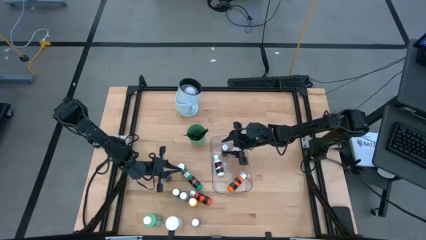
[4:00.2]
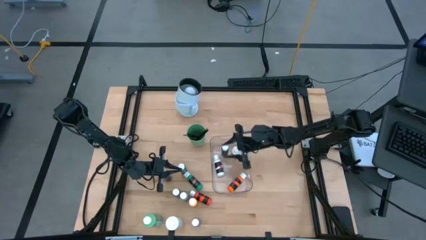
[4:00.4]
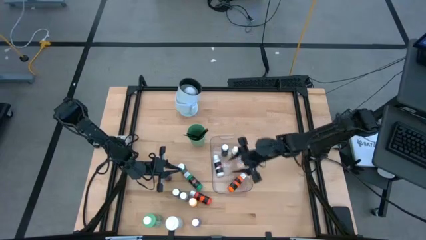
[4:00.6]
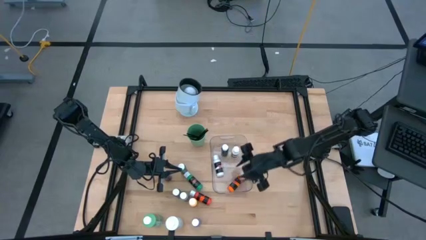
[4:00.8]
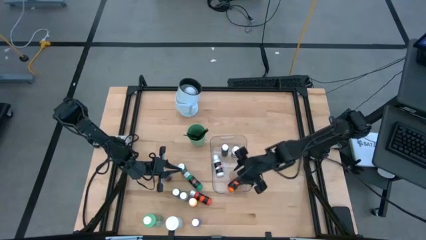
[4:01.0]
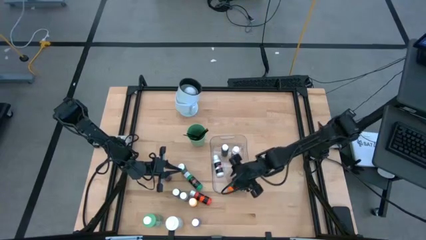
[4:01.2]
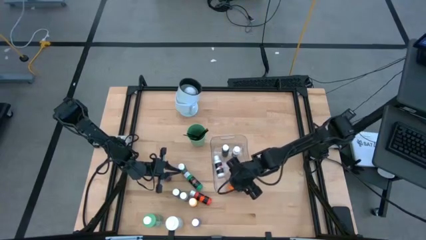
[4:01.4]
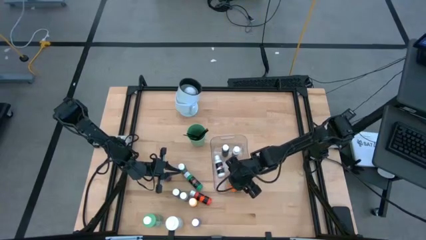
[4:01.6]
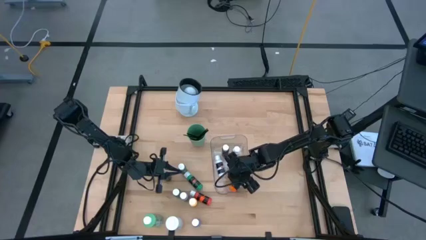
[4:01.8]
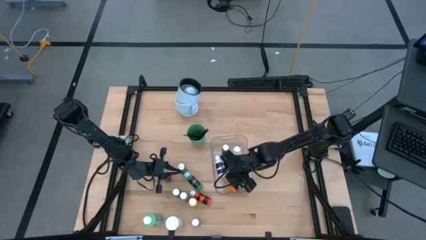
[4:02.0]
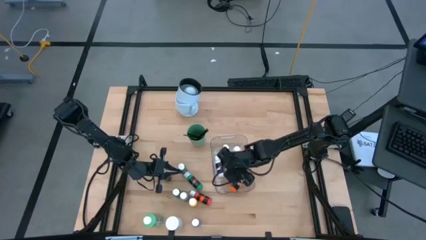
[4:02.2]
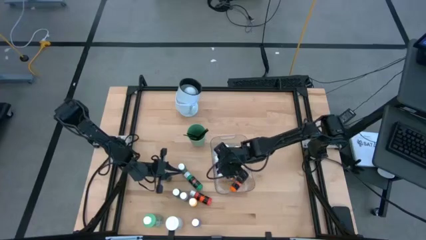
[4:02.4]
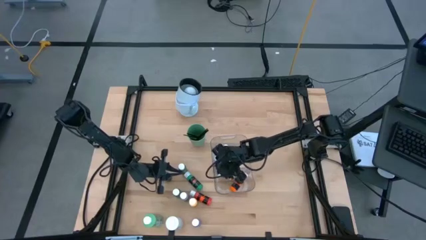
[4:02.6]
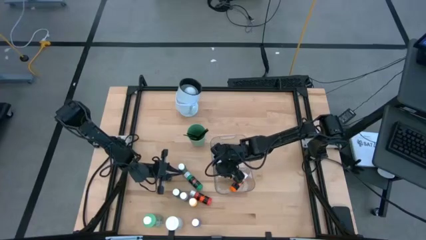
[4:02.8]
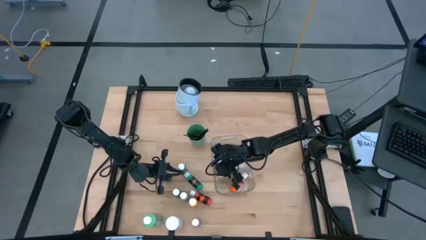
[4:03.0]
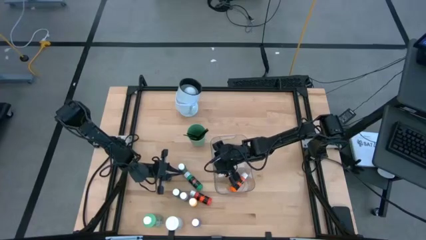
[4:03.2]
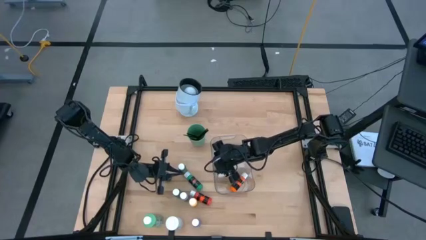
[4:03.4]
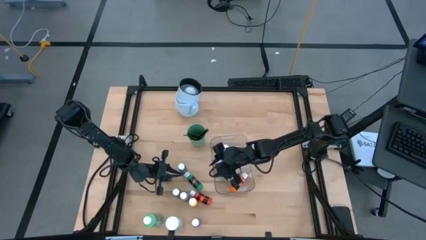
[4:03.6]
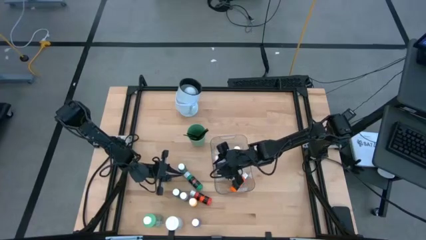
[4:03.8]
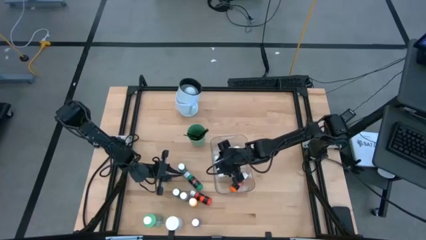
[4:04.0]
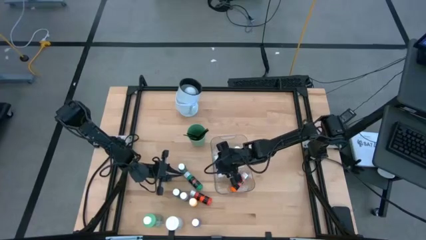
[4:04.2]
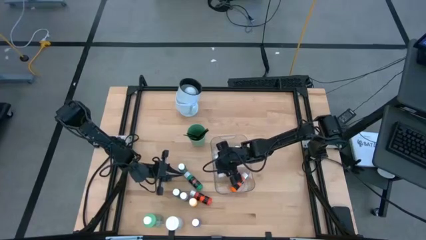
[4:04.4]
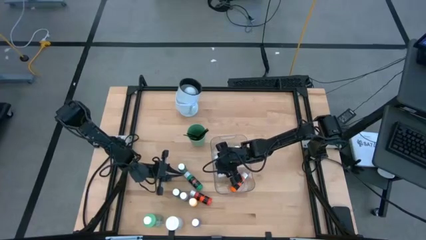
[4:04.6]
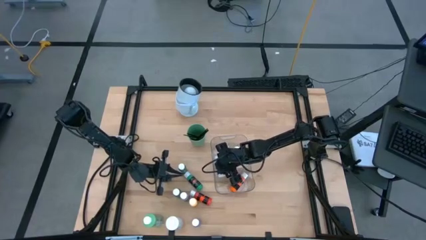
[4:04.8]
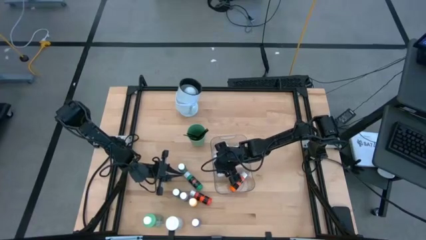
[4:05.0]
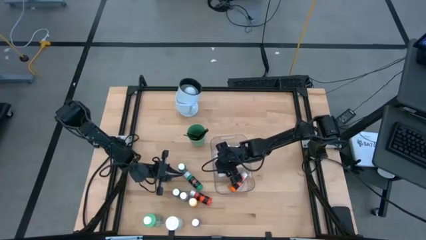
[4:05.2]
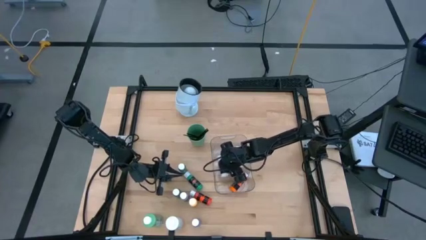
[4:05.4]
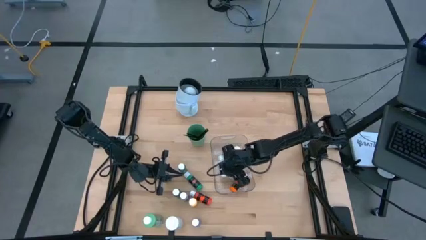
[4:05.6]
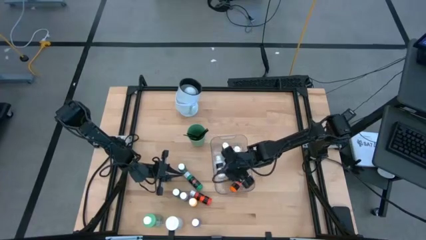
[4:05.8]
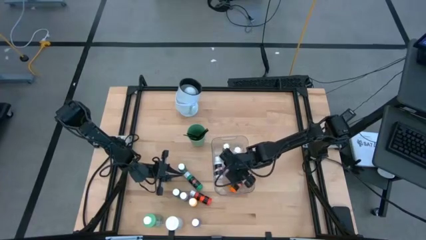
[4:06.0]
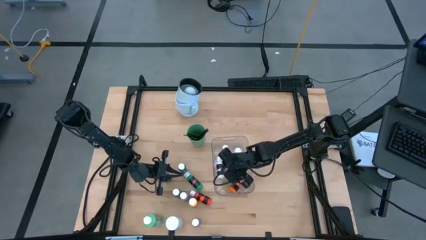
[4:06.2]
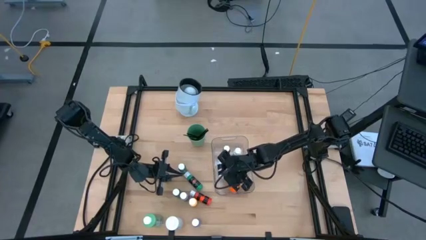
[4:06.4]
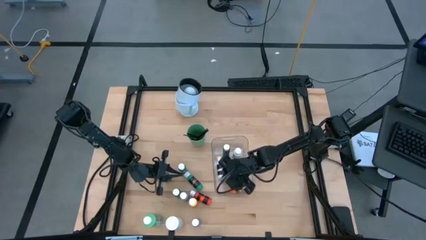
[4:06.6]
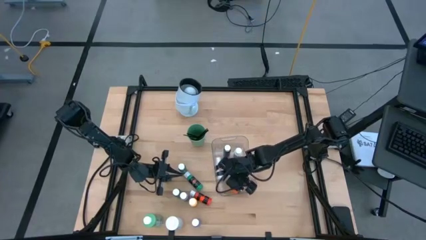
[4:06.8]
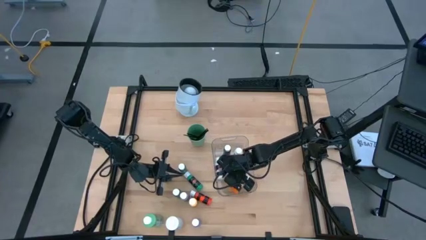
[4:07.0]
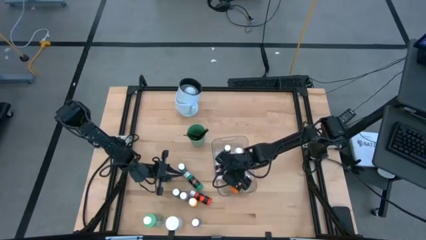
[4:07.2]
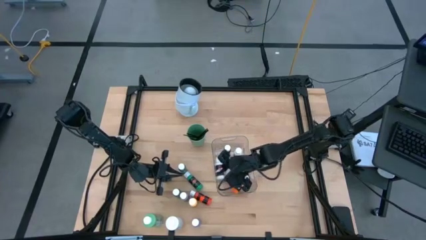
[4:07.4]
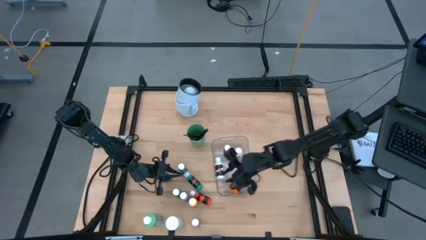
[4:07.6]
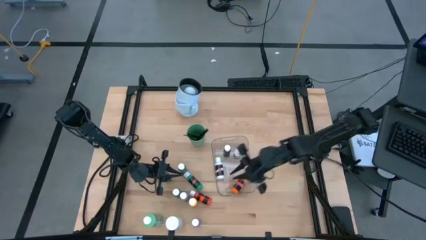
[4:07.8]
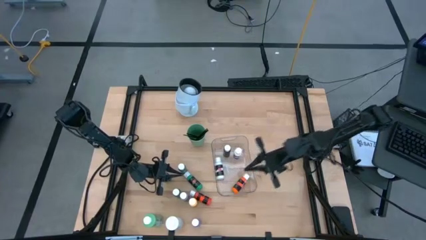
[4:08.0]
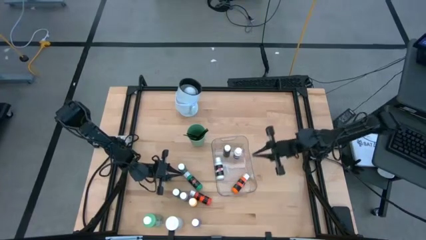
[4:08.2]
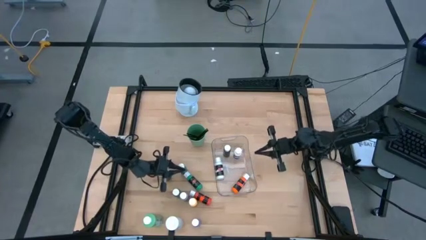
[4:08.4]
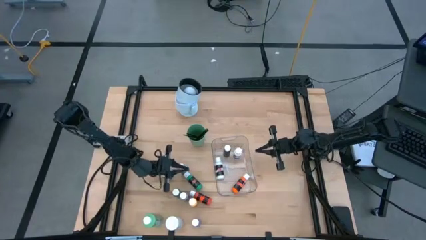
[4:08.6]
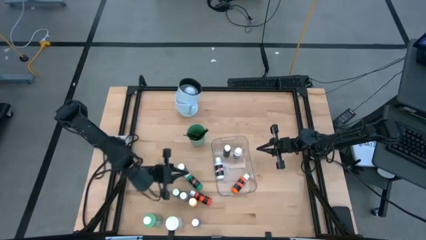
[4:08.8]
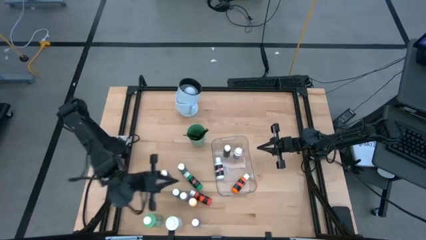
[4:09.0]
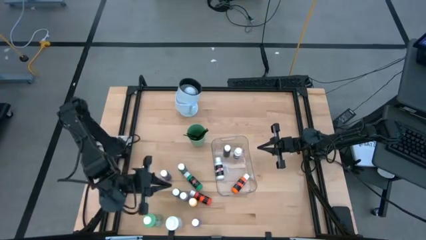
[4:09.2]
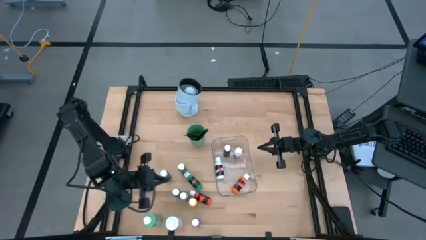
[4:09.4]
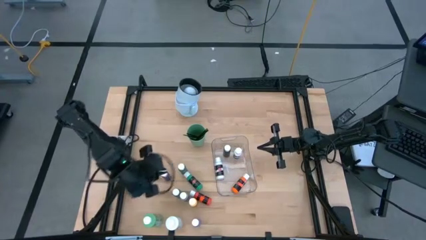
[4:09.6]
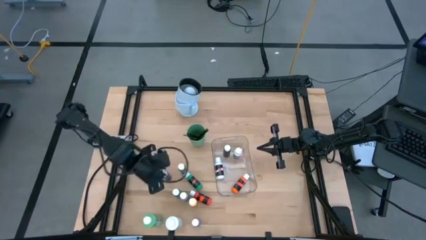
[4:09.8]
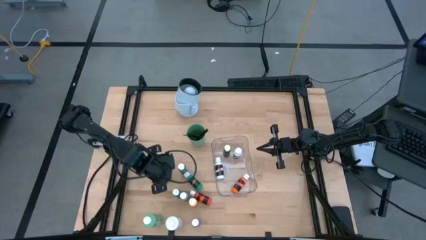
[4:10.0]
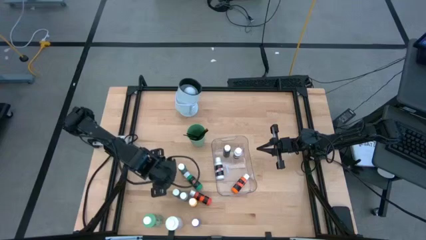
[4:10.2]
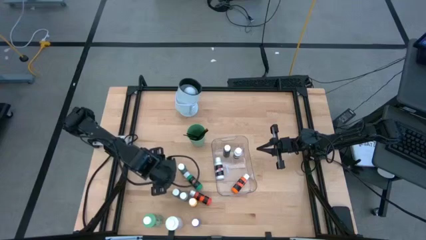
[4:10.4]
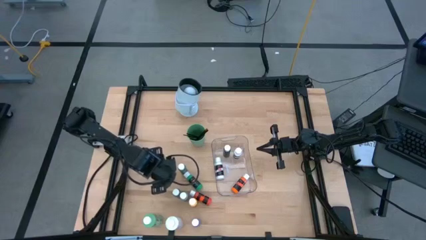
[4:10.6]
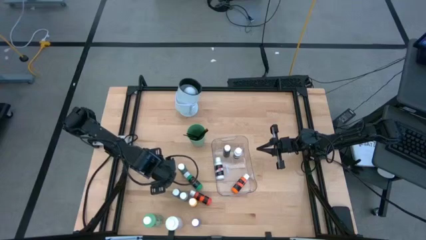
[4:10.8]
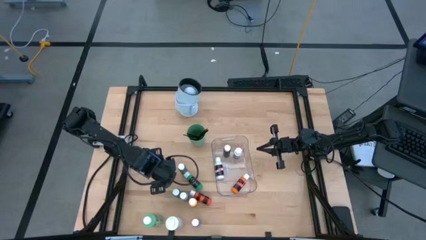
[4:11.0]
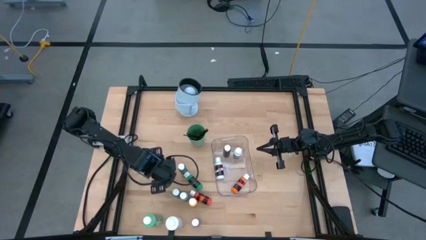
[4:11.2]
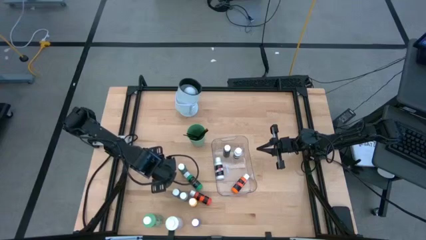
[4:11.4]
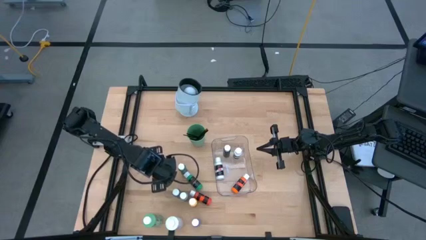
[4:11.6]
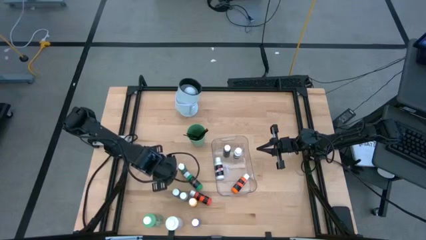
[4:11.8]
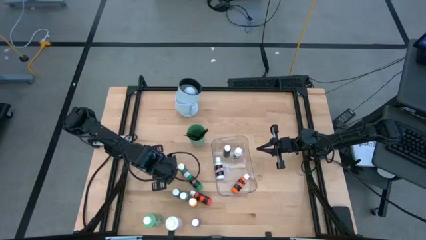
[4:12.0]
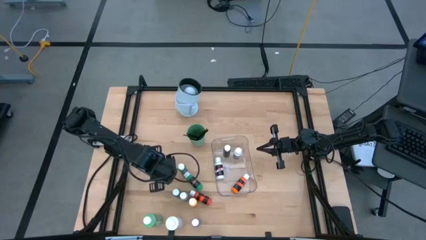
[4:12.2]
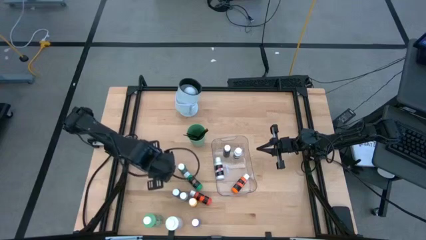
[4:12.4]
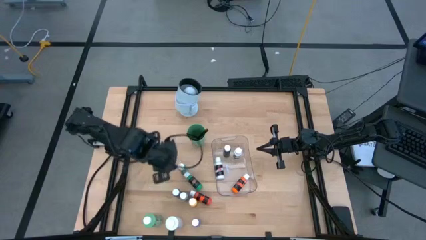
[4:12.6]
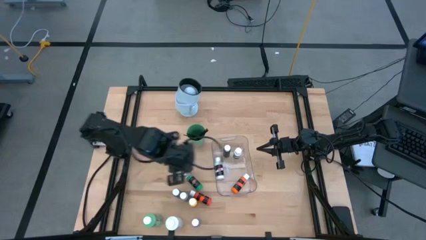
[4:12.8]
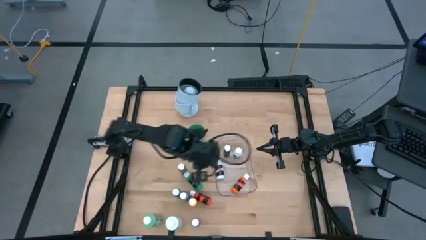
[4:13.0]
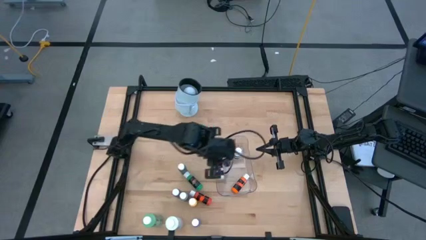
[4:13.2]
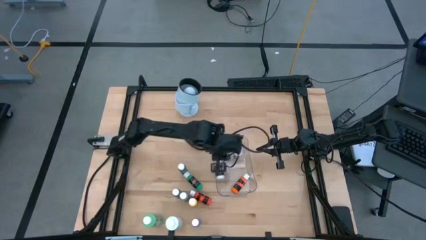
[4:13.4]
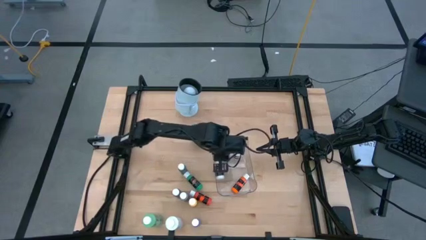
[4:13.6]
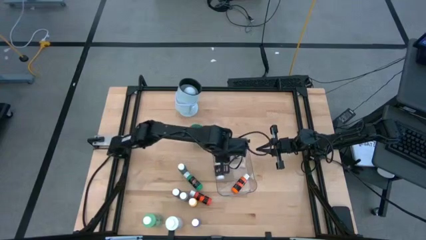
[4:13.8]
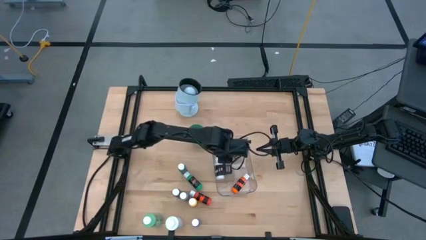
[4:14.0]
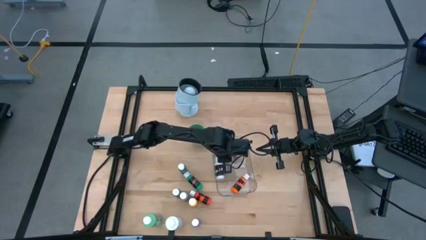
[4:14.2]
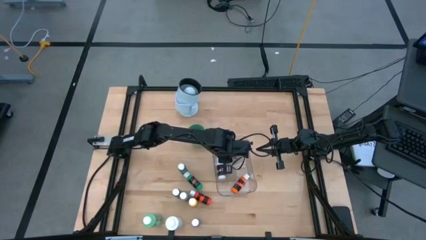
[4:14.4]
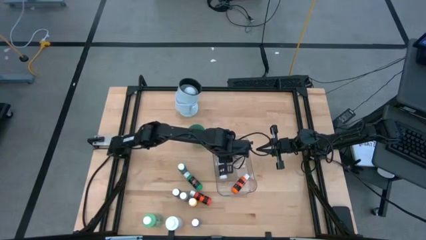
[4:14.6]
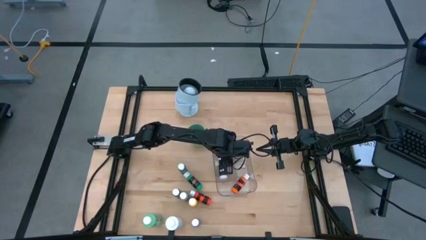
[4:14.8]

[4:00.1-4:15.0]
Task: Pick & Place Paint Supplies
Put the small blue paint bottle into the transparent bin

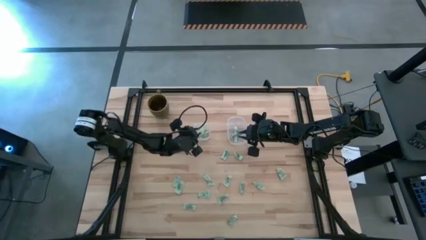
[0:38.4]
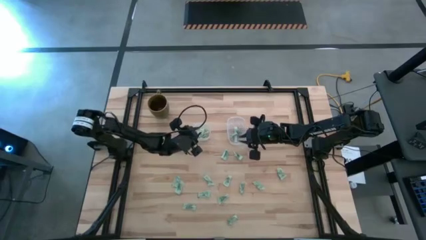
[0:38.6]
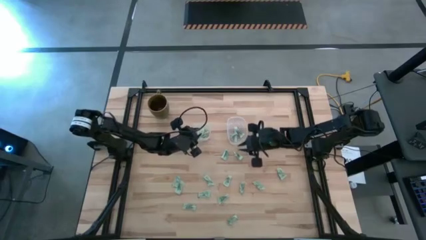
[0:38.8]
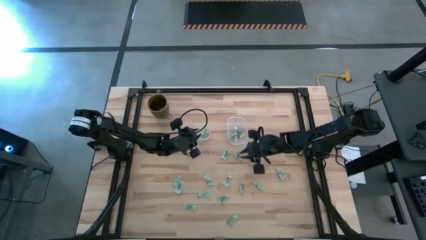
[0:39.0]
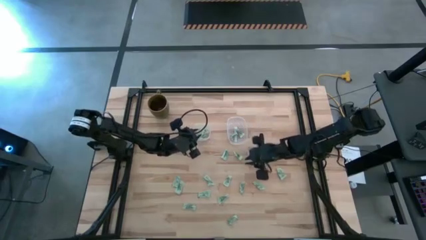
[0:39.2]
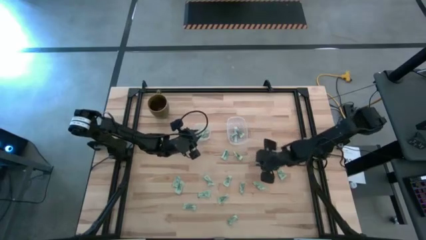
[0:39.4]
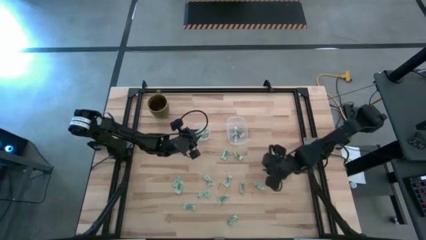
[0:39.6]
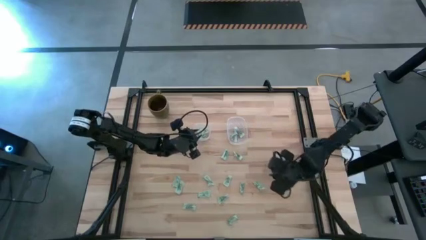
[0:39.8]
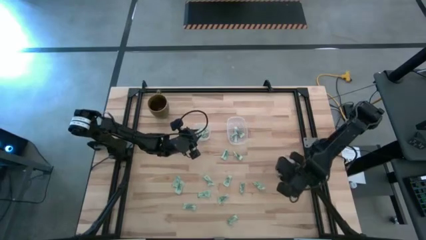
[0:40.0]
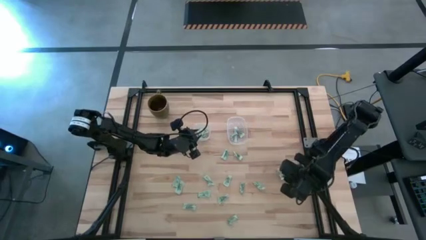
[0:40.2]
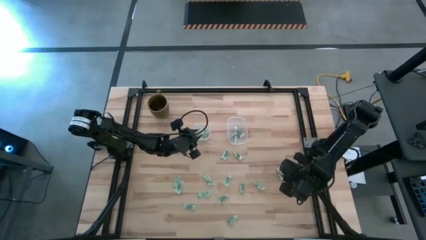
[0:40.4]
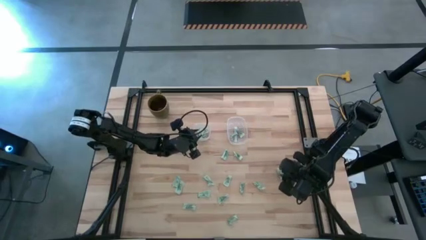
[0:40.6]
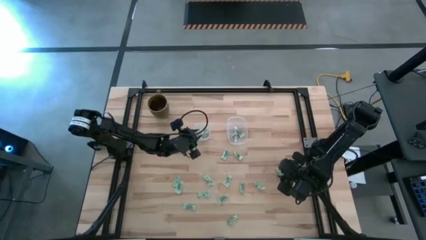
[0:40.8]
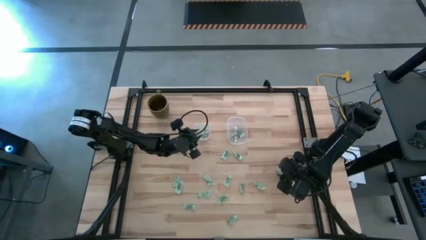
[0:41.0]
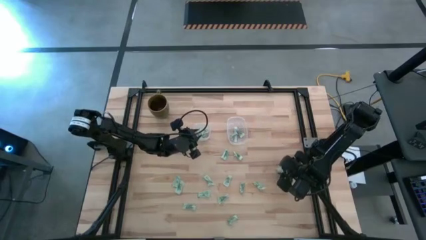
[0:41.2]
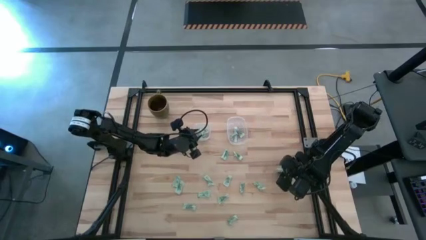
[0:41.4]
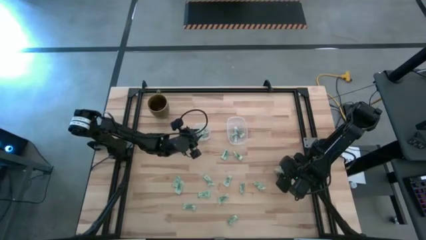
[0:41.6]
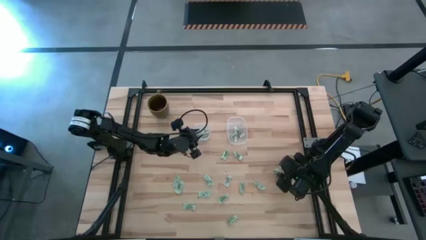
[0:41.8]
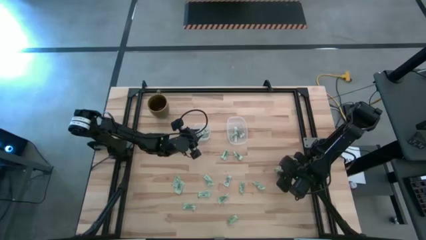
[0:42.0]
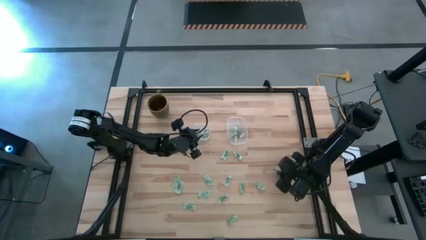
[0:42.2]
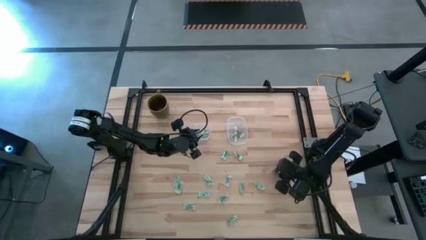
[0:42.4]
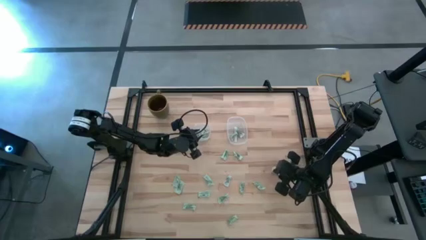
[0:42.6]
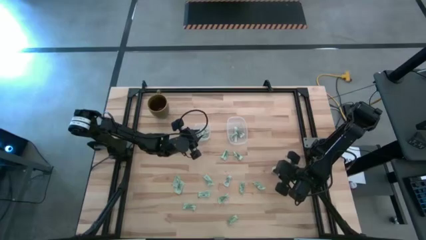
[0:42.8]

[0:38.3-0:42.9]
Task: Pick and place items into bin
Put the light green stevia packet into the right transparent bin
